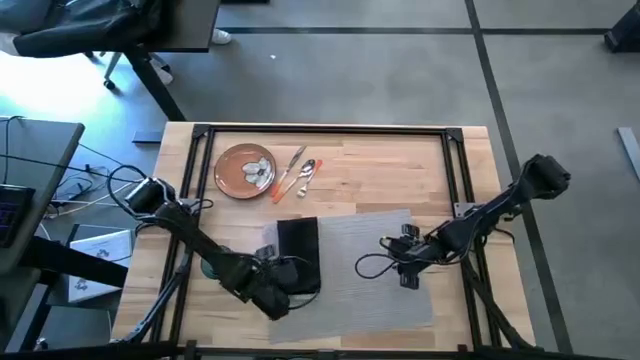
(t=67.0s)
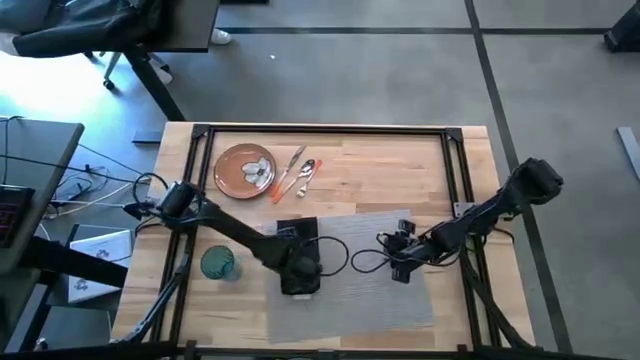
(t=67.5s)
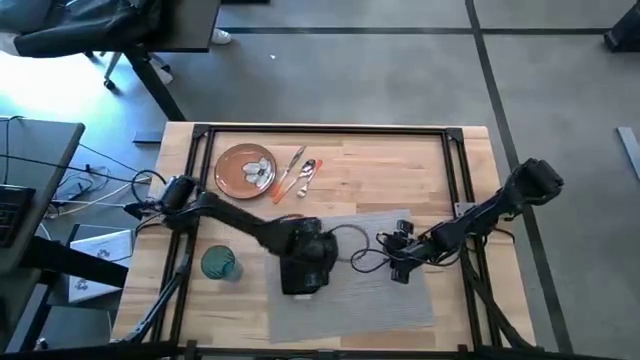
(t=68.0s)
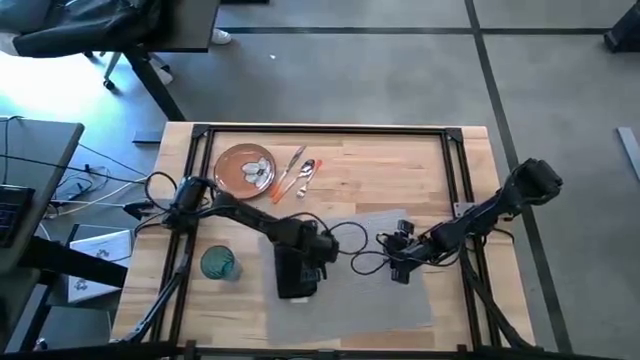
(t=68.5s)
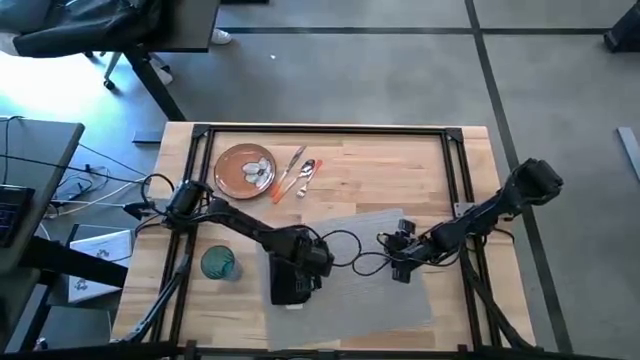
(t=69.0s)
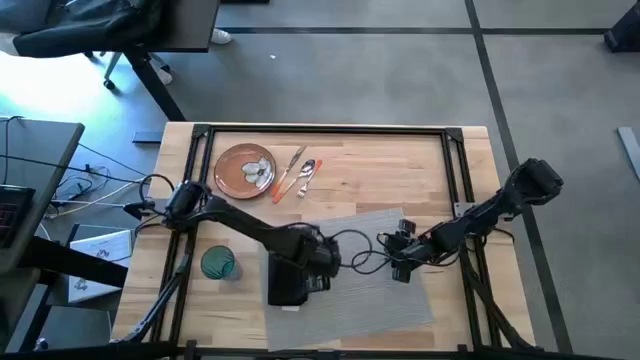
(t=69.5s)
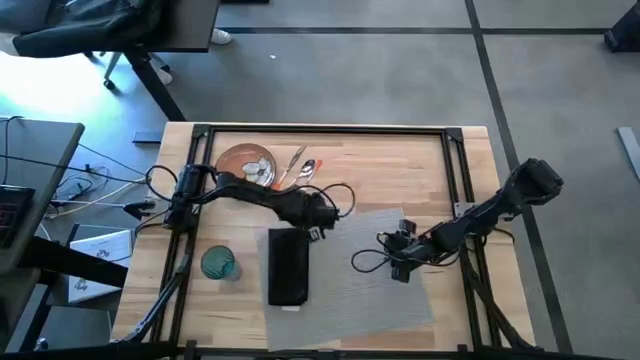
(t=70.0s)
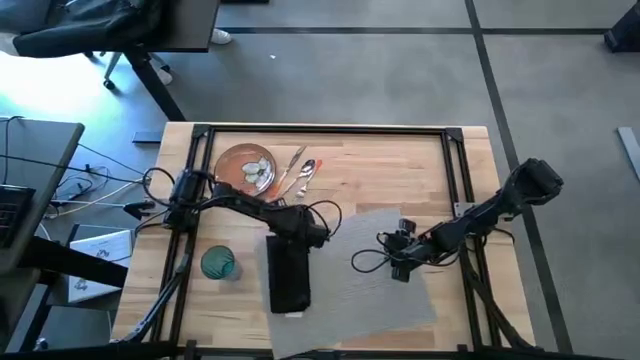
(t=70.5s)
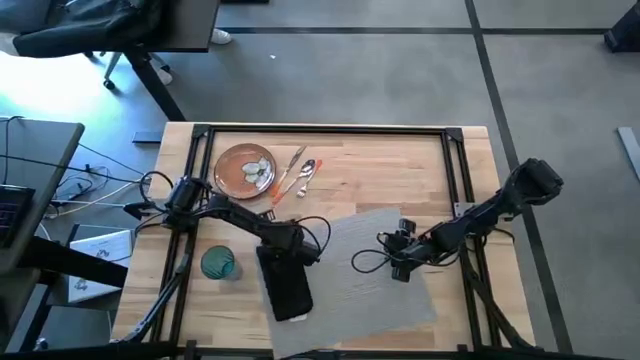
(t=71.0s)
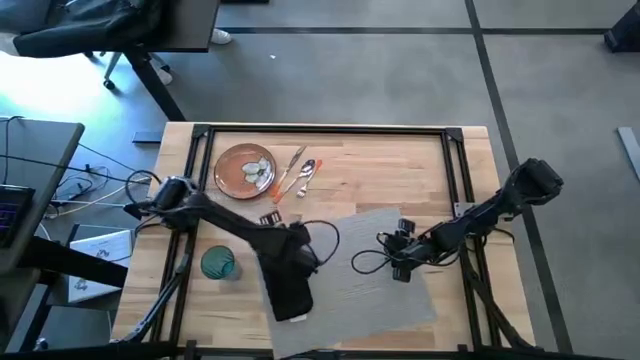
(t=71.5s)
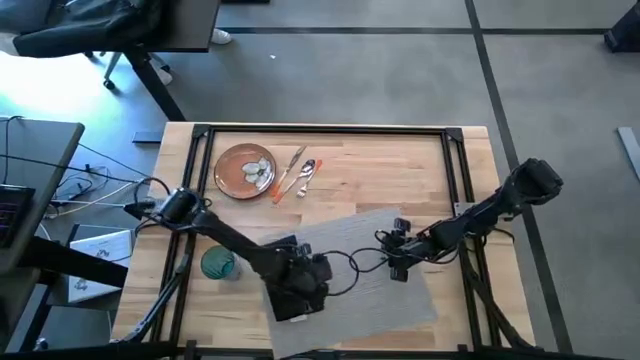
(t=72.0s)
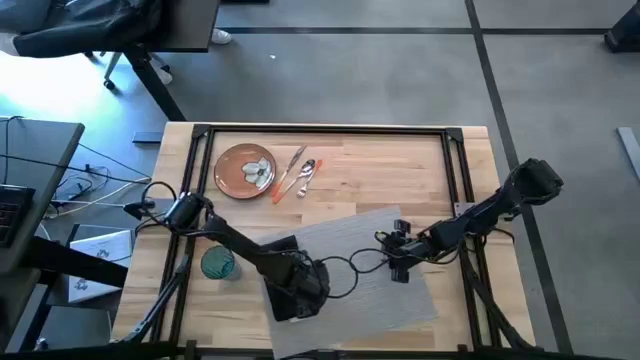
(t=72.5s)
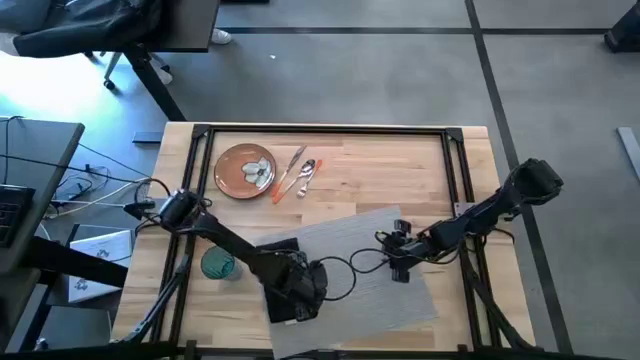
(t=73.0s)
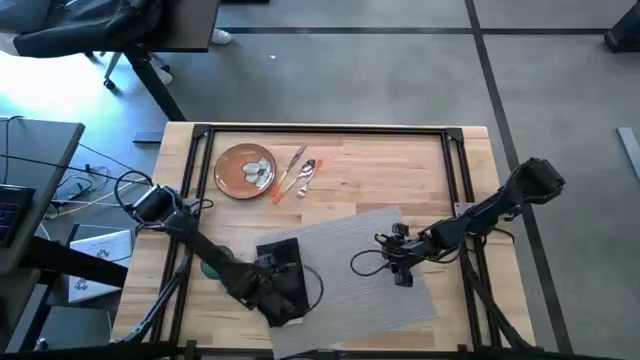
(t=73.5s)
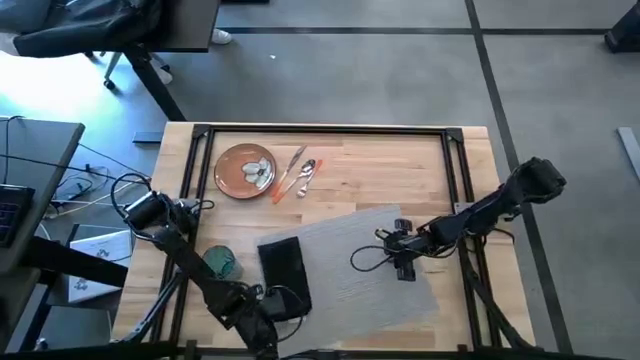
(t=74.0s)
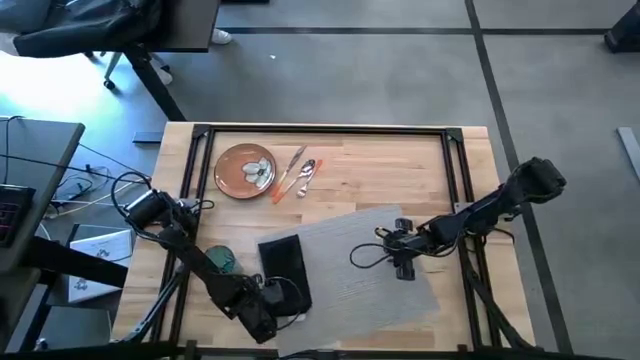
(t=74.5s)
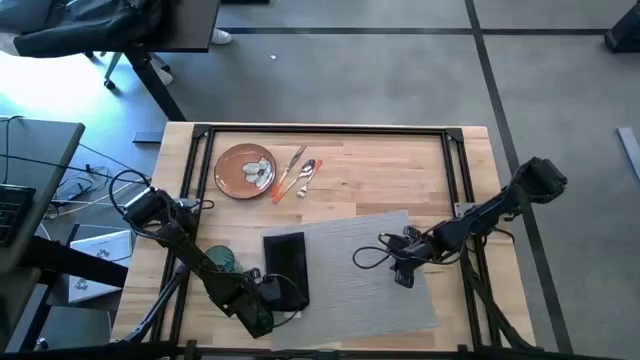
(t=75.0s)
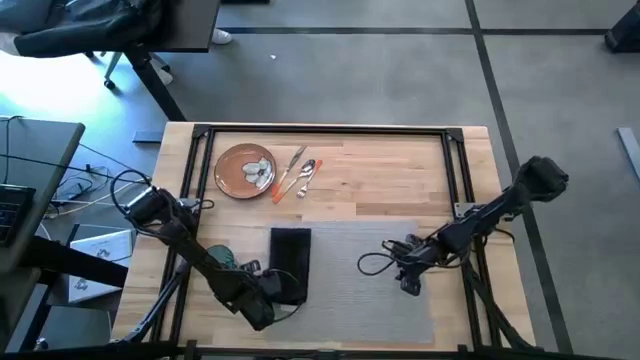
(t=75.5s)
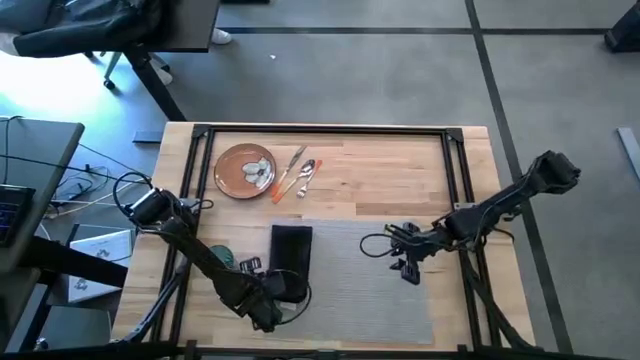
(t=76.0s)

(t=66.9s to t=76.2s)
Task: Set table place
Adjust the black napkin

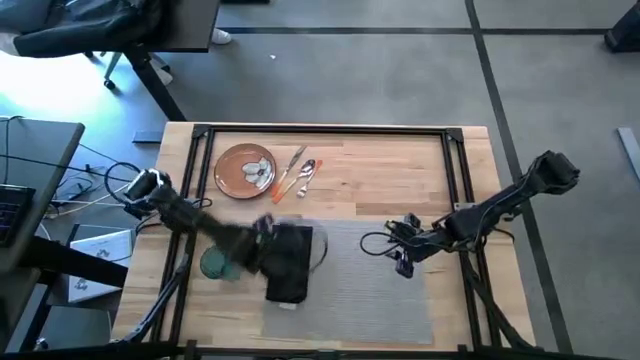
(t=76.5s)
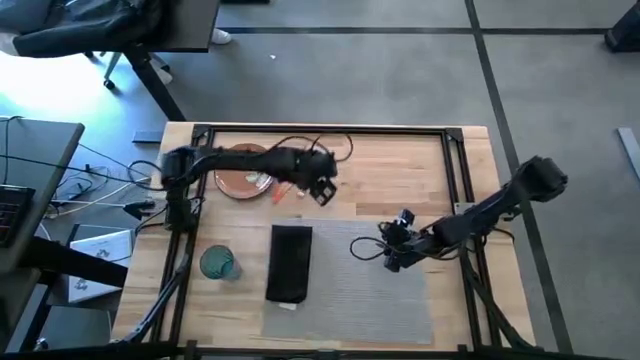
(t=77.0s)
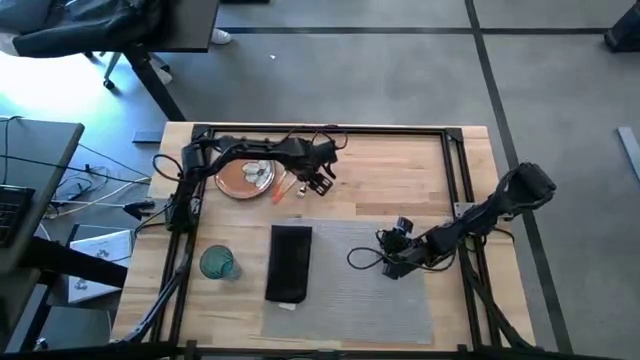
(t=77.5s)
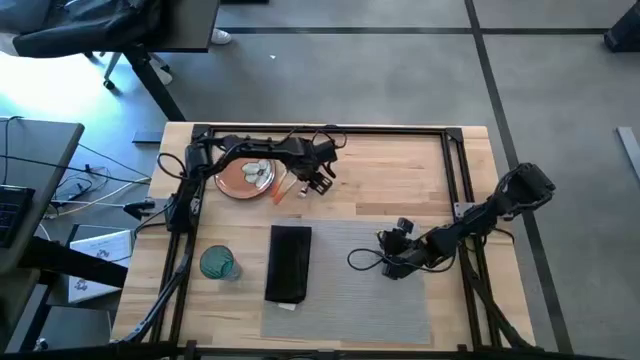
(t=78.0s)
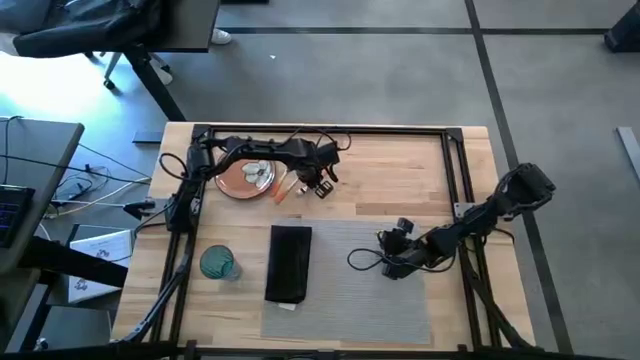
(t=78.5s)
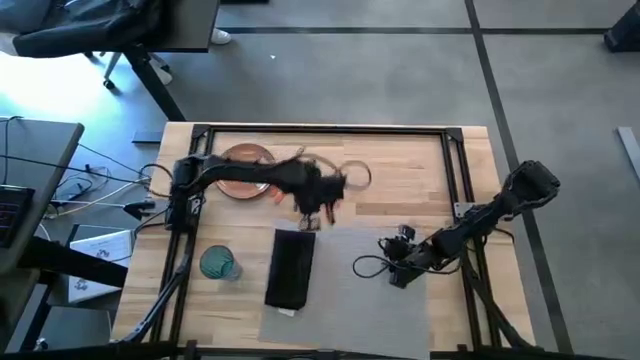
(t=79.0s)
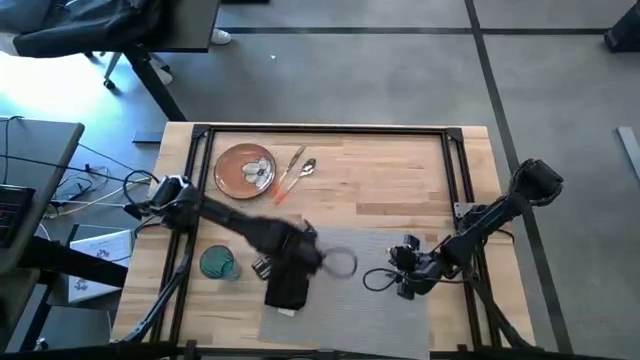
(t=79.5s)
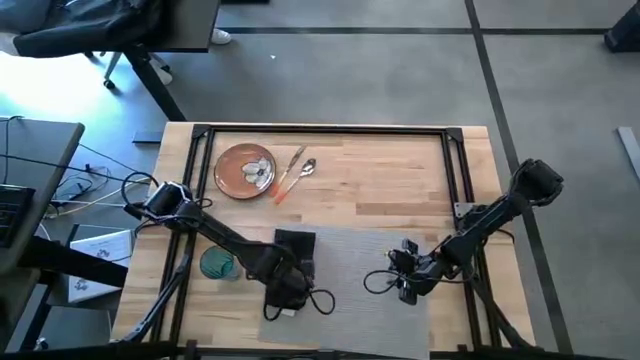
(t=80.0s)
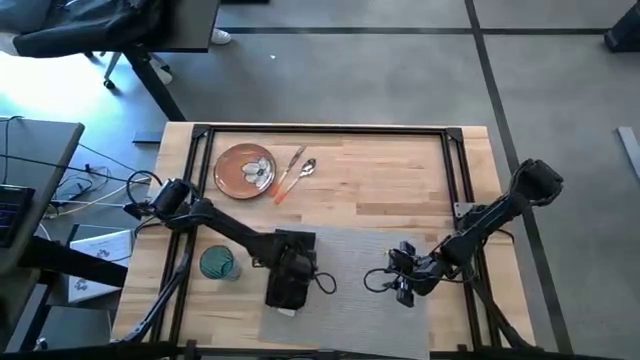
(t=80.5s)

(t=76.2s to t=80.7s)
Put the orange fork on the black napkin

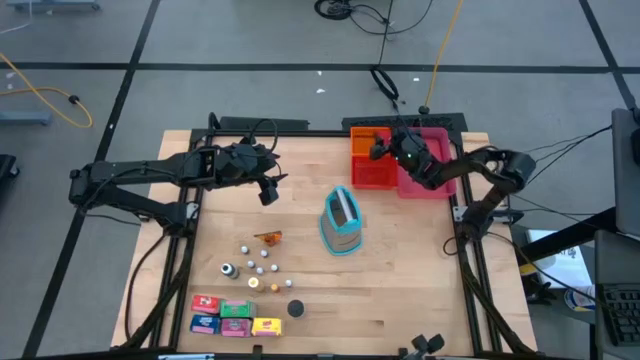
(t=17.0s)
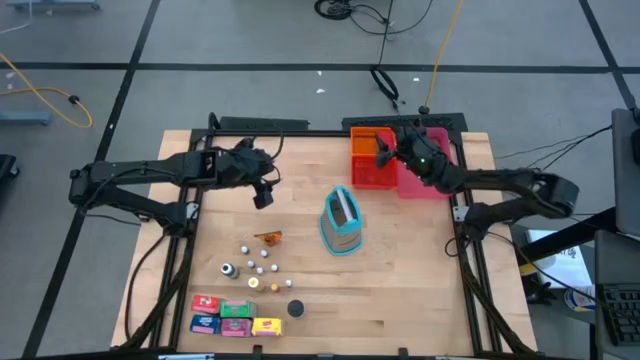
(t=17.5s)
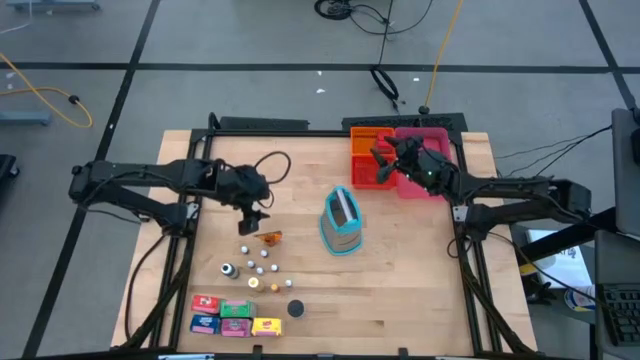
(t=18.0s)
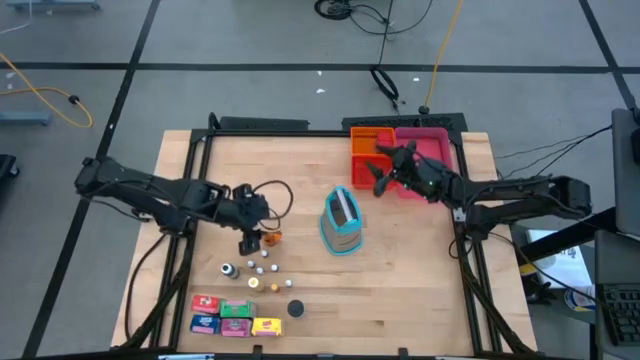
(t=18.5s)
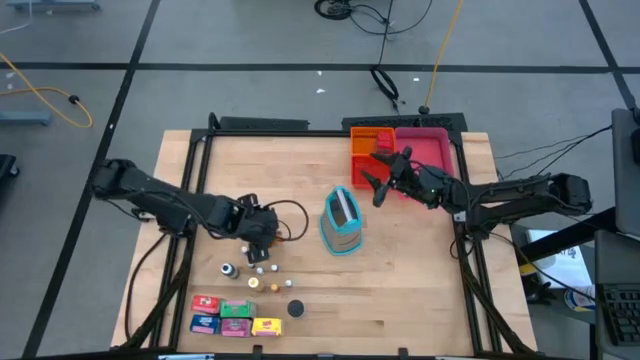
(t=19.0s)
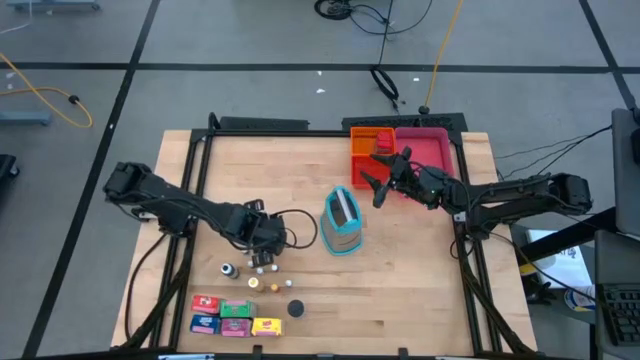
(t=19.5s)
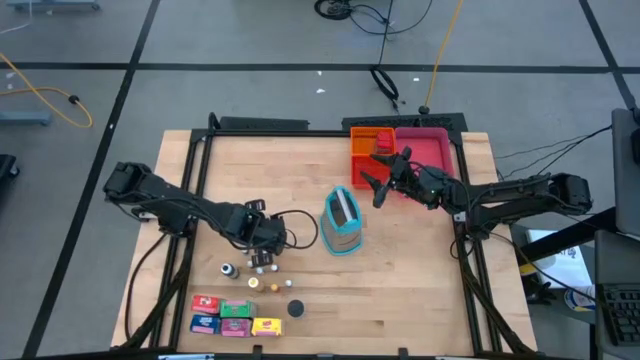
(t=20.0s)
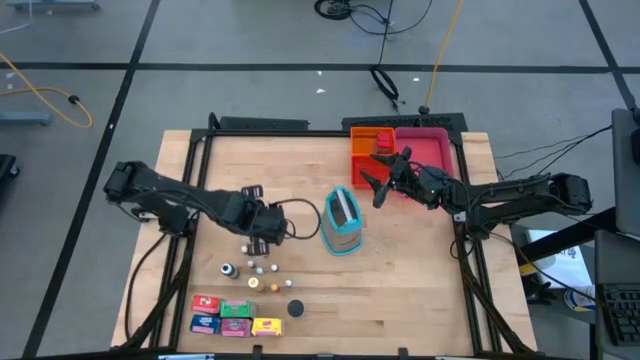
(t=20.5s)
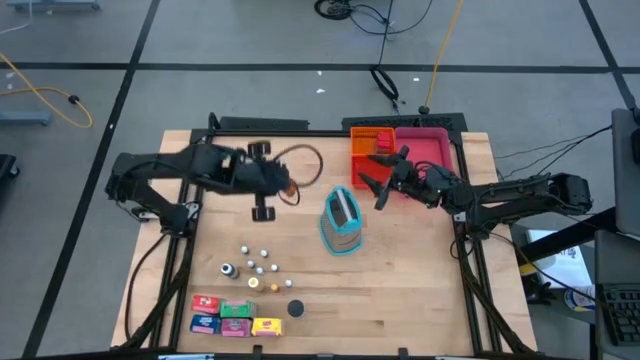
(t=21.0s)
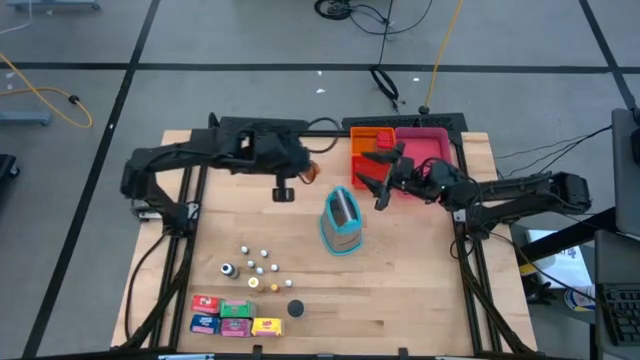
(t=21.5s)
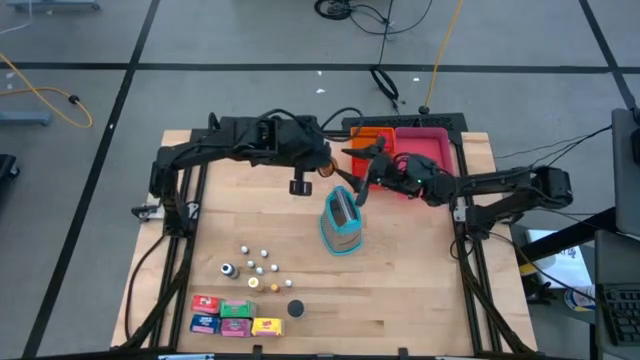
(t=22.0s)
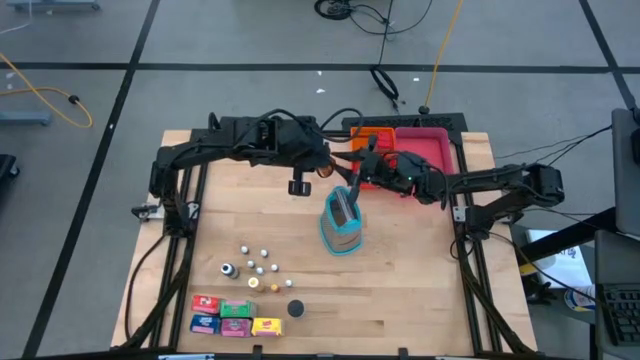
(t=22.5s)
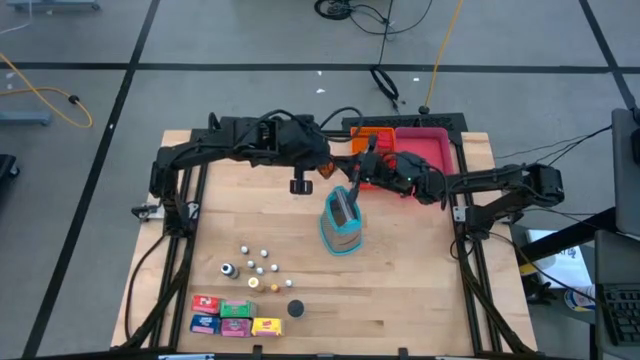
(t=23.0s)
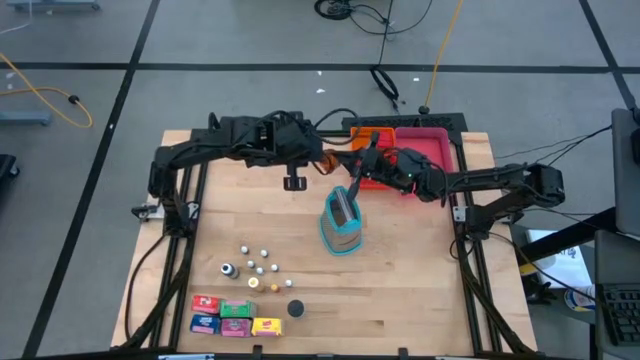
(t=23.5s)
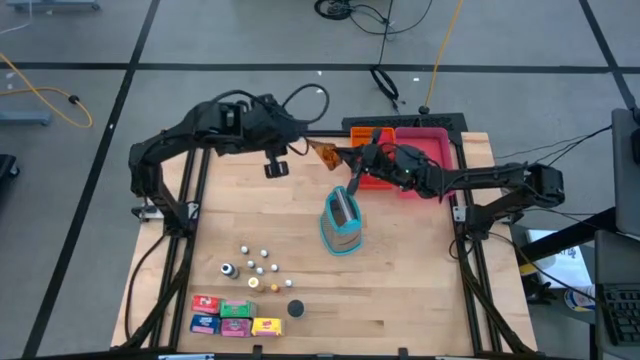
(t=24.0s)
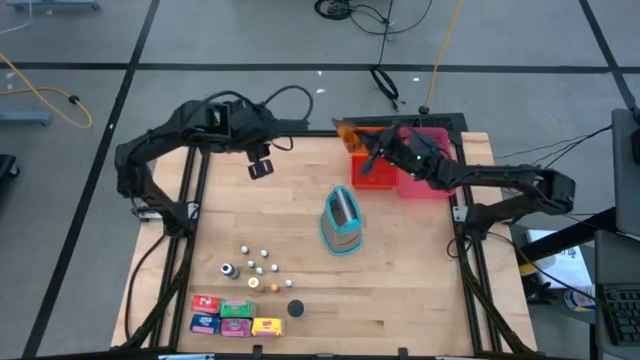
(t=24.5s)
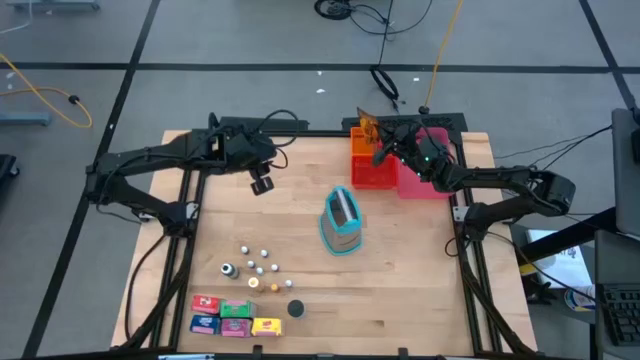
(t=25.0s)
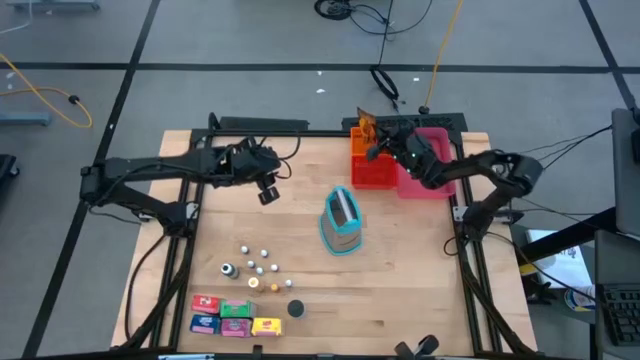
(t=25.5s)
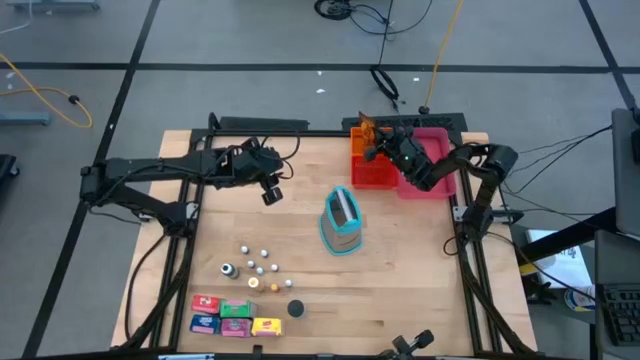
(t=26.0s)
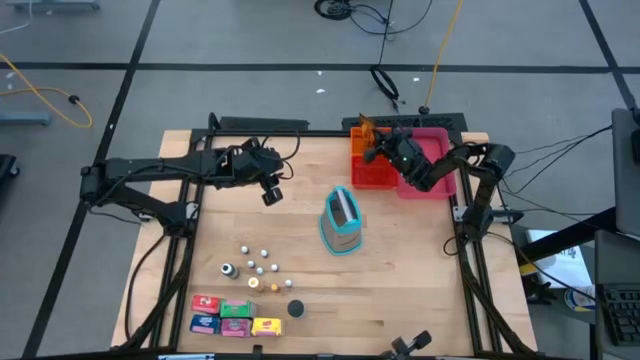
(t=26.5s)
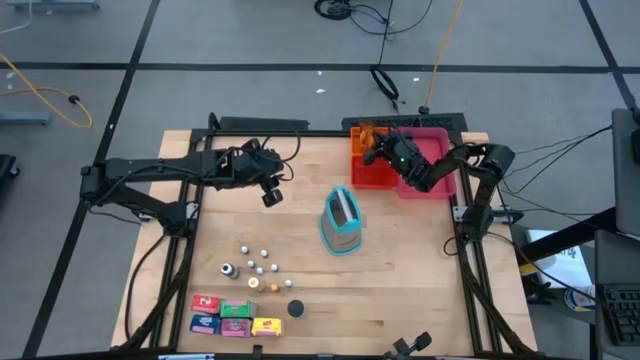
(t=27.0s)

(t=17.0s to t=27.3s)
Task: Pick & Place Kitchen Items
Put the orange seasoning pack into the orange bin
